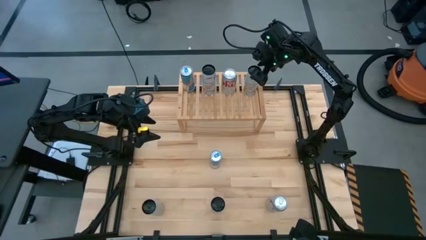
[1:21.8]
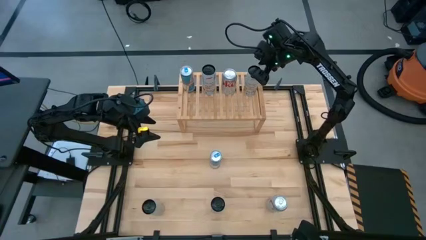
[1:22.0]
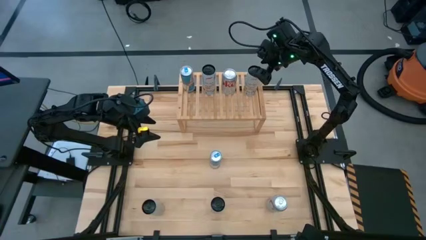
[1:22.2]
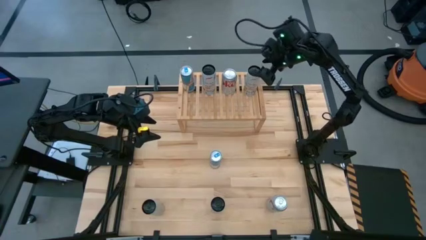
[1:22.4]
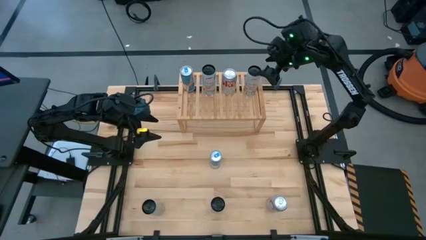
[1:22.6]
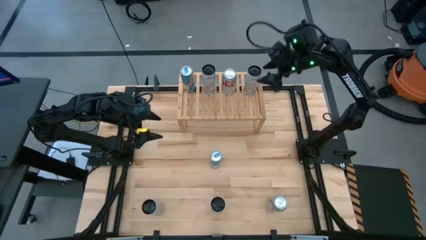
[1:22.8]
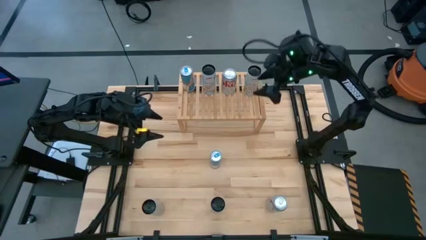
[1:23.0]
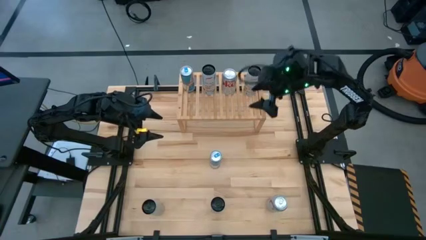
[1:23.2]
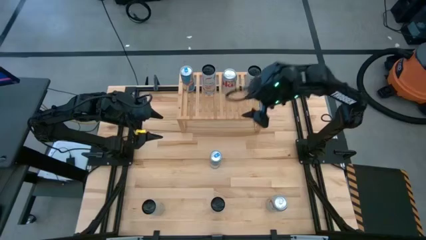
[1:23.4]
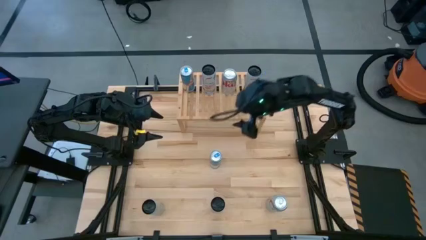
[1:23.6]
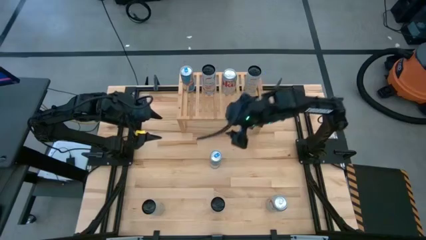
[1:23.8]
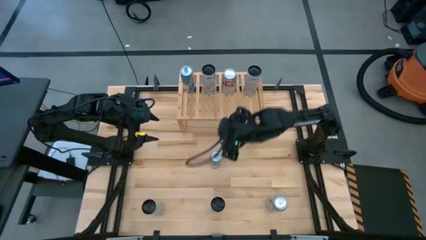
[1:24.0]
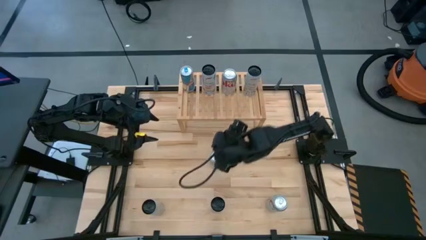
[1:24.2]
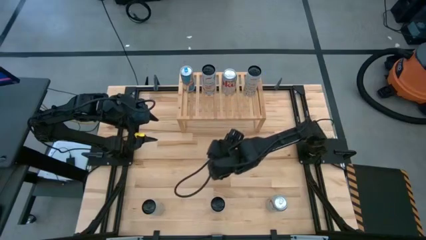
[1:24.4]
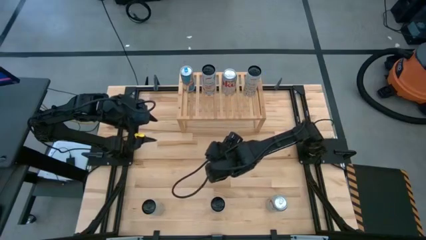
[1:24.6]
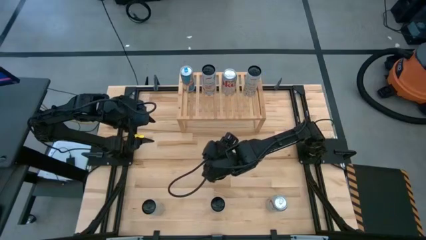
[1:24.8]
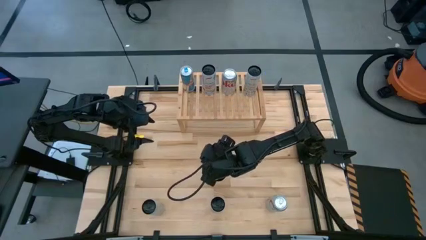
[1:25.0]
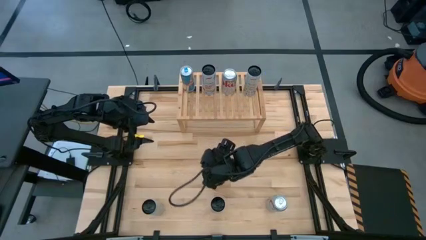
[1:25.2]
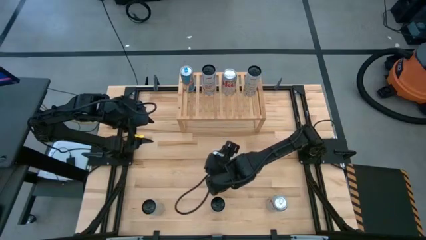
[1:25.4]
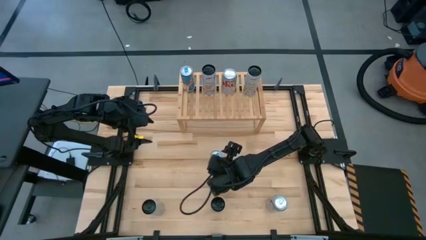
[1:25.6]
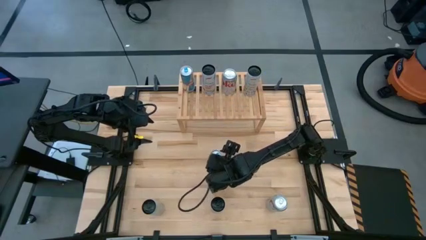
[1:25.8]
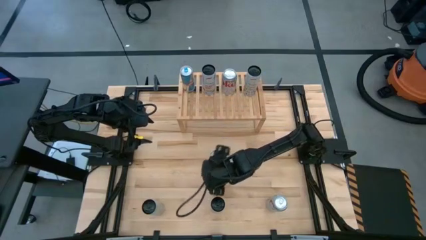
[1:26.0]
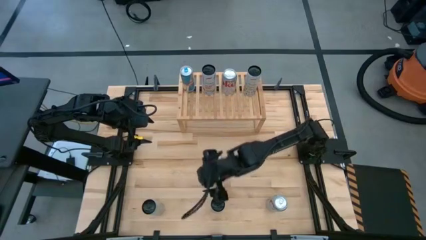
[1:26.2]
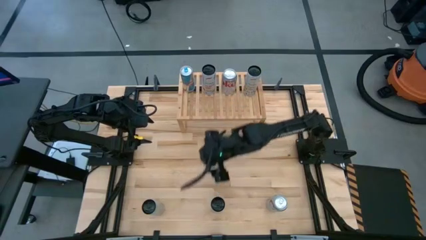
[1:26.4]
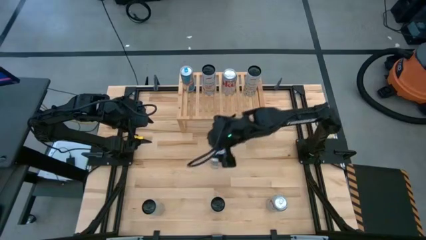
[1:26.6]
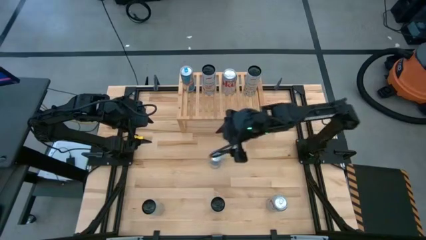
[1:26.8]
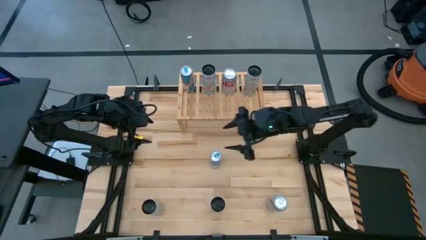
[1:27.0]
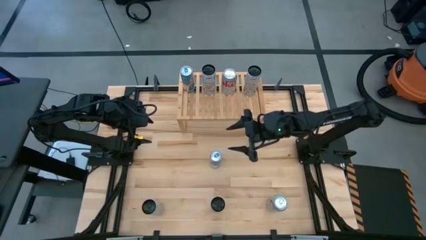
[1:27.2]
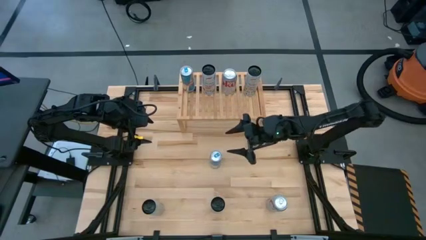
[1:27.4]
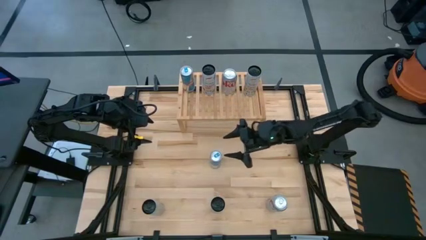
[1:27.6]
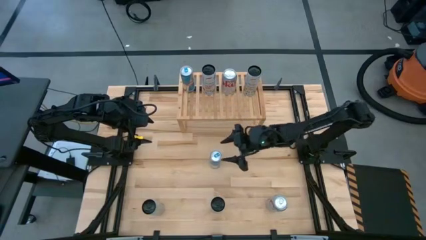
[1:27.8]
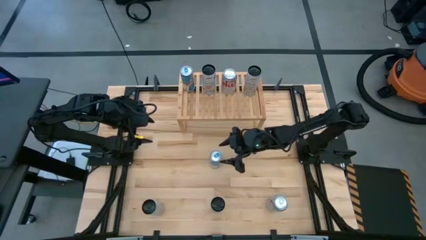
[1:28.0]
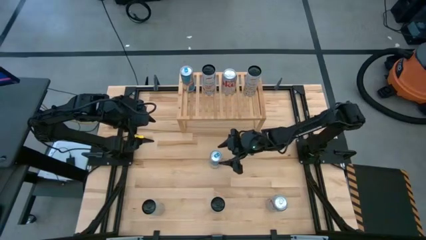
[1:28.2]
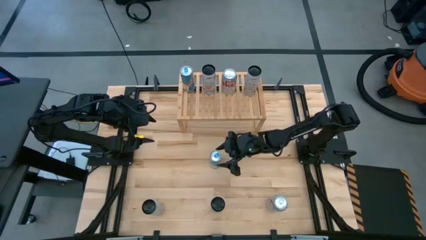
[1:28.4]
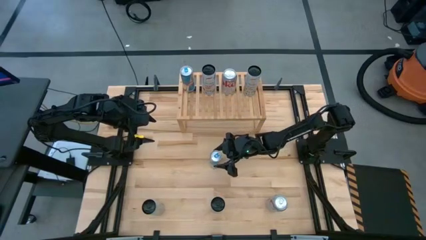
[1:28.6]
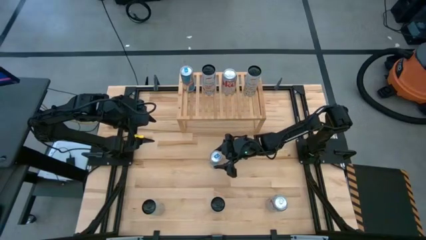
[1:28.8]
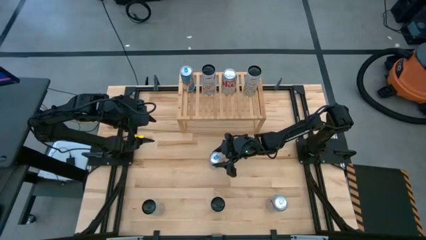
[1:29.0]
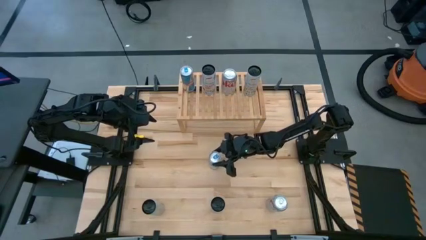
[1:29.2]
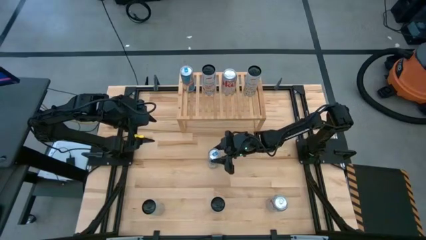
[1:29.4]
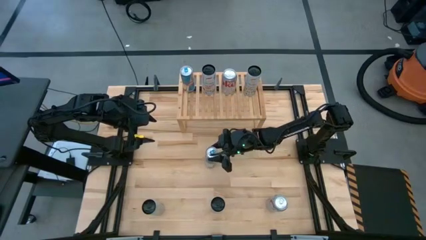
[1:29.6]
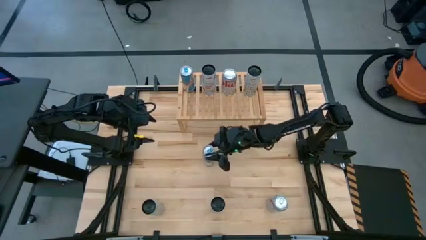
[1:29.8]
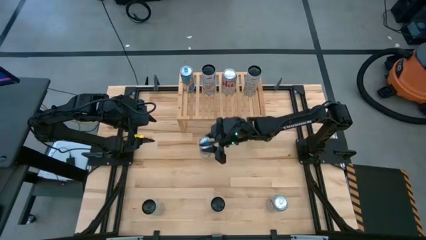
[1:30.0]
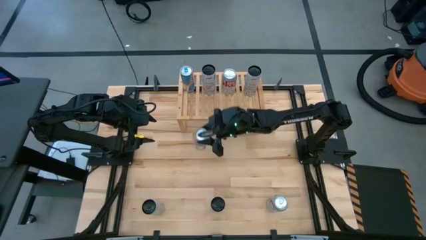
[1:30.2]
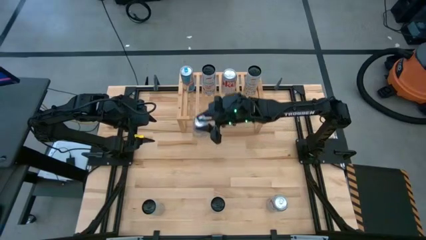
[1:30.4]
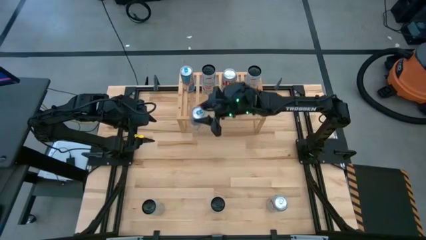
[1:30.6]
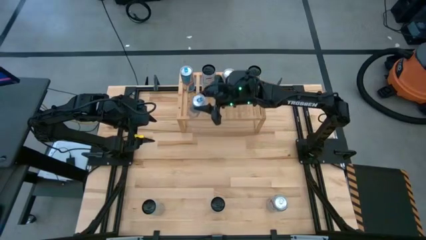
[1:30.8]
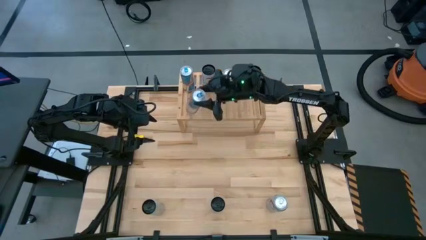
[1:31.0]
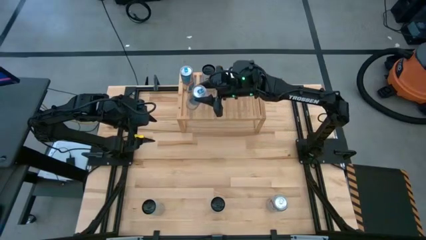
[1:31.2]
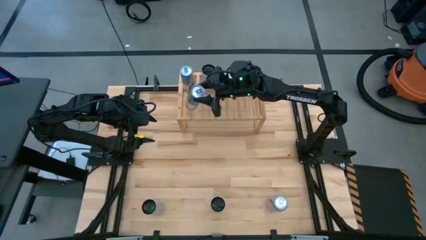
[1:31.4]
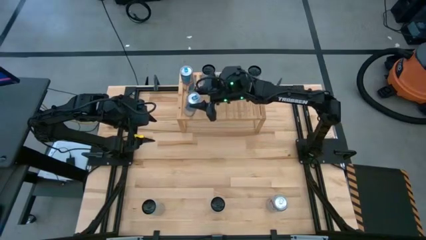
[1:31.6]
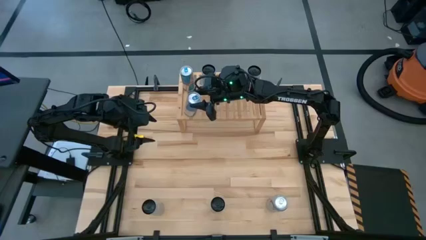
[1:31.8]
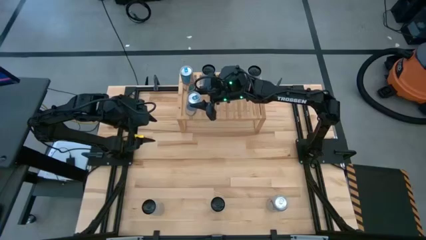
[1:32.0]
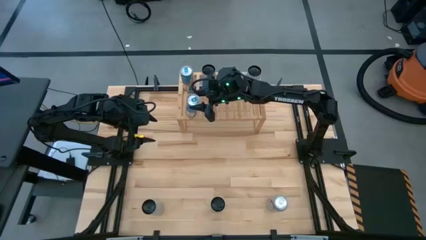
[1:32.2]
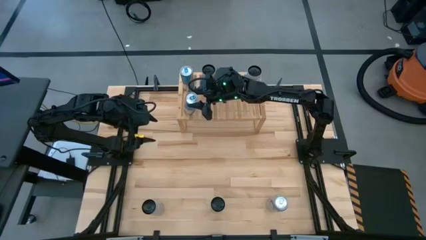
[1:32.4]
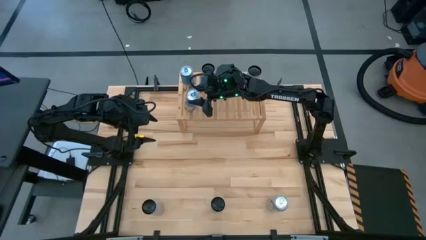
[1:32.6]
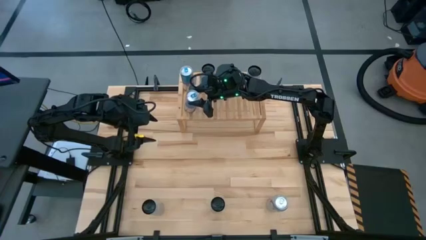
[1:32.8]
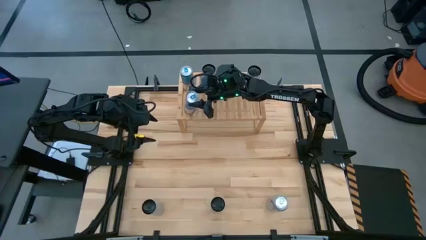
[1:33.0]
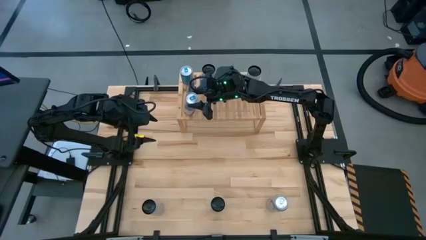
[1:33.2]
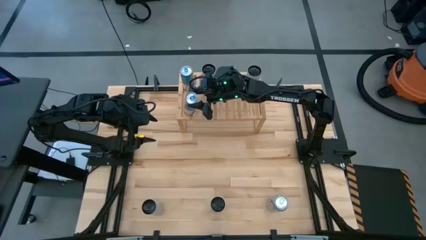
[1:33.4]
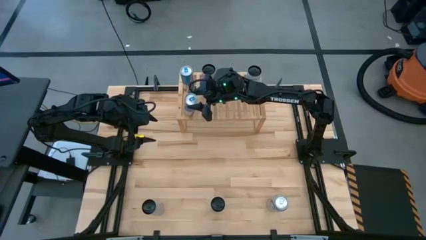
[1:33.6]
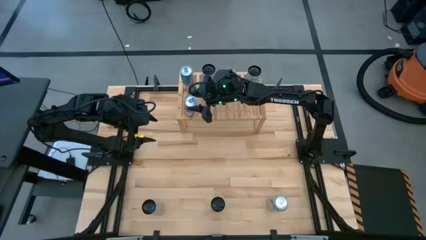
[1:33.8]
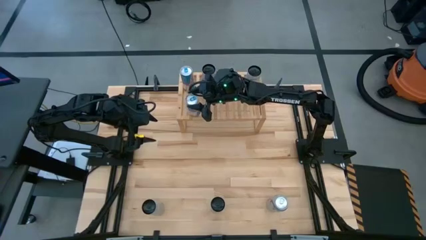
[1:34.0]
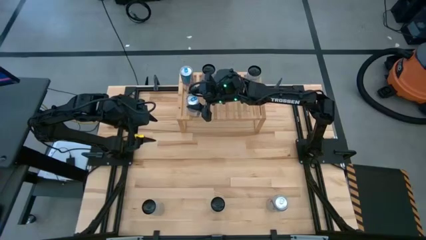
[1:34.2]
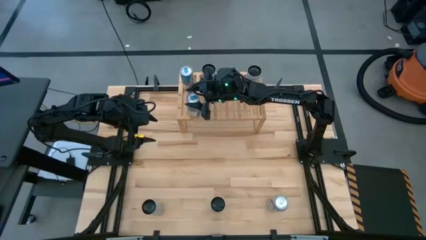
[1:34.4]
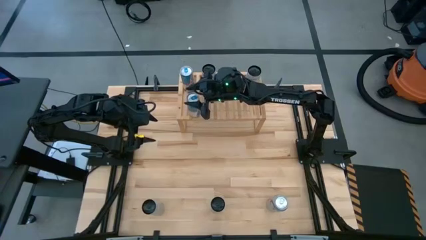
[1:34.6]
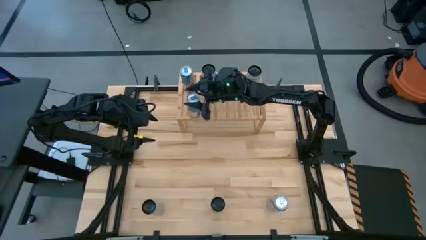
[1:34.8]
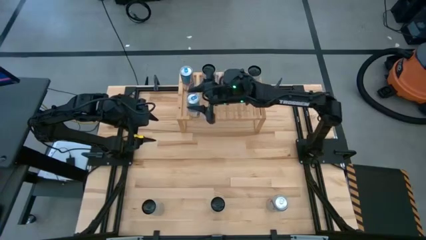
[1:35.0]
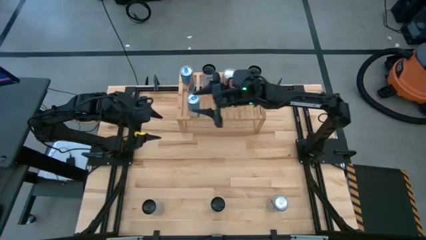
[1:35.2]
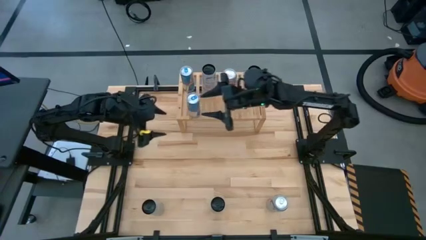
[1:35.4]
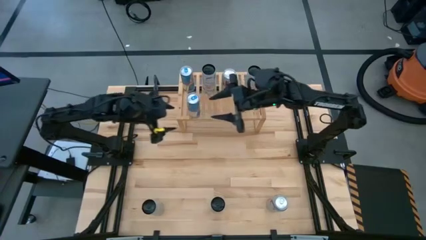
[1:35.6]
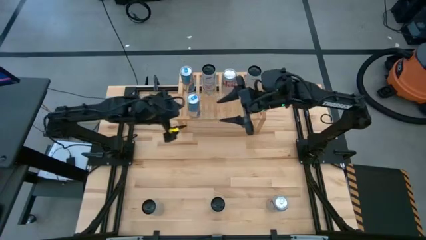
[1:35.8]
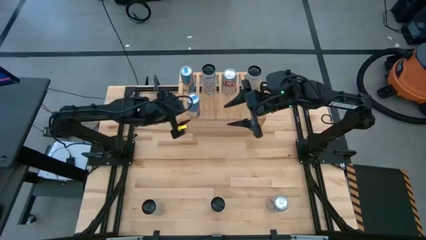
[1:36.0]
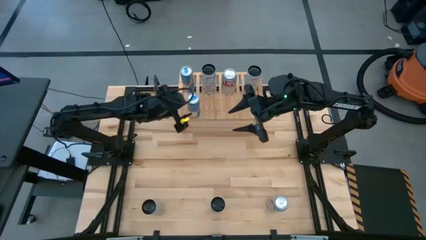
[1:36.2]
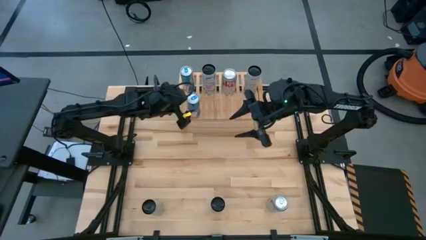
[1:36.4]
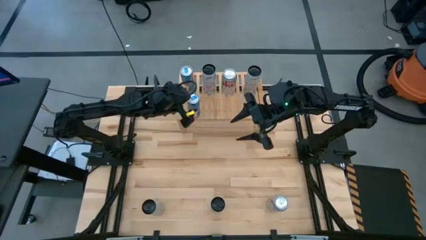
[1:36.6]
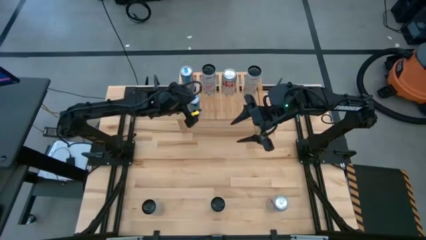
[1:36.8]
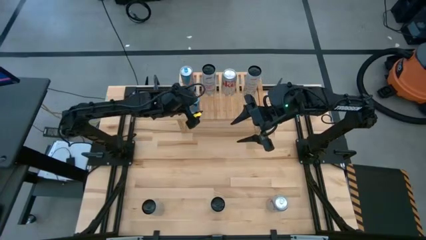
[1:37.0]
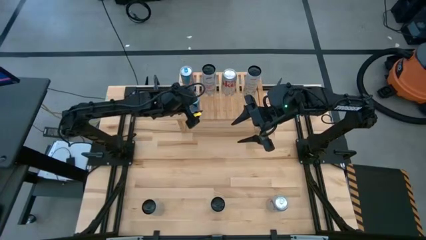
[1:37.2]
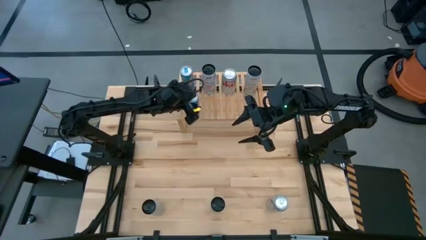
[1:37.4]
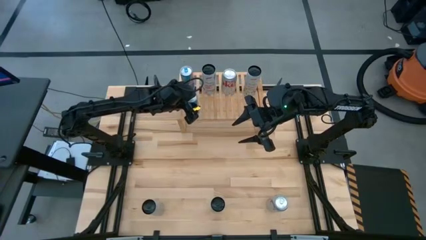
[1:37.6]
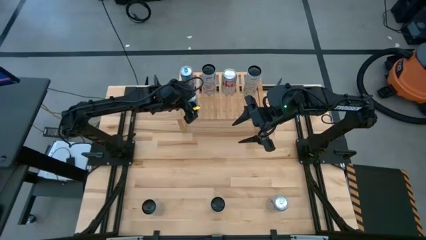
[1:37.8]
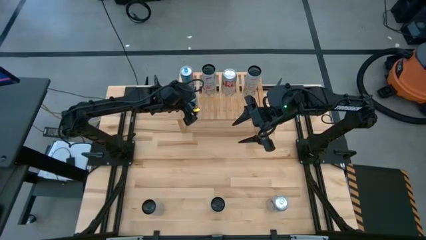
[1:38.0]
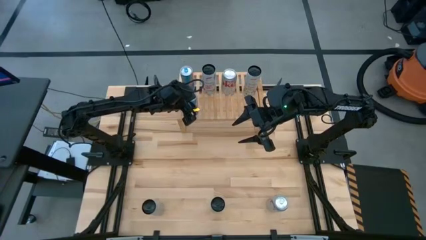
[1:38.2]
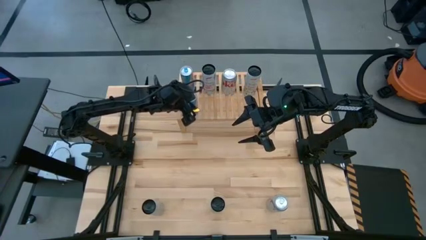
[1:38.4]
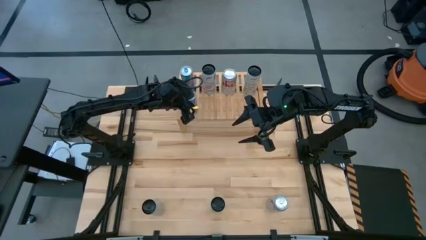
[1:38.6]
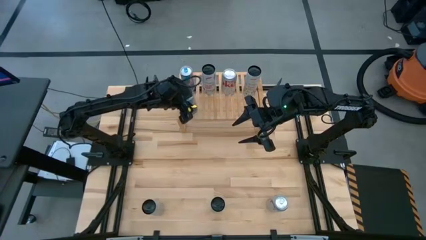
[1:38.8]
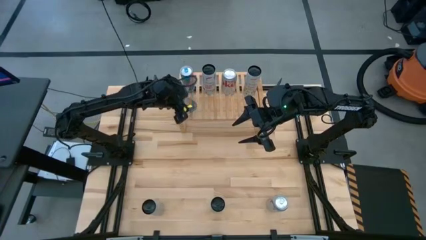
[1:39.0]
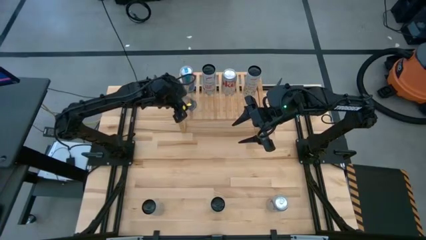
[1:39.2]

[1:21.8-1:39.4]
Task: Place canned beverage on shelf
Put the blue soda can on the shelf aligned with the blue soda cans
